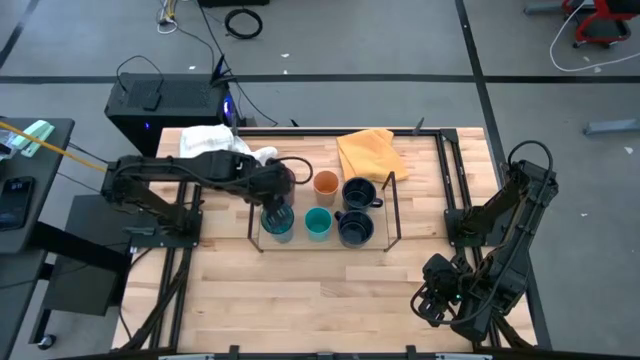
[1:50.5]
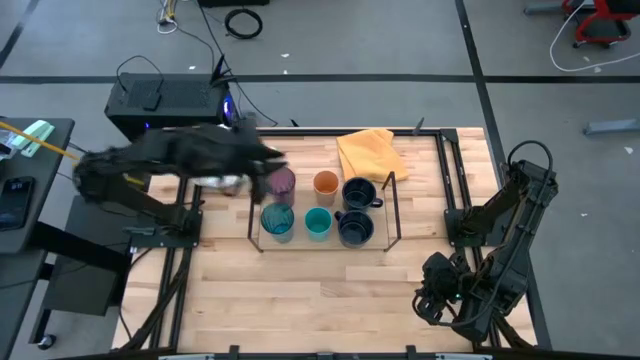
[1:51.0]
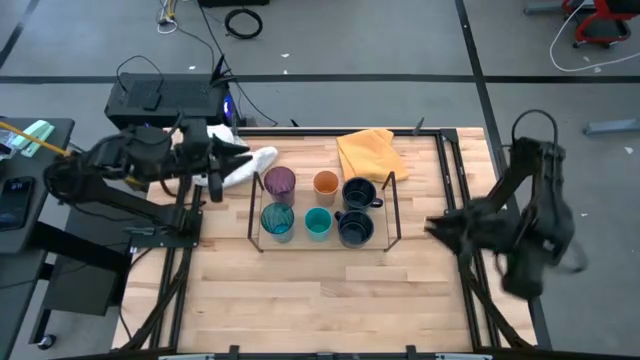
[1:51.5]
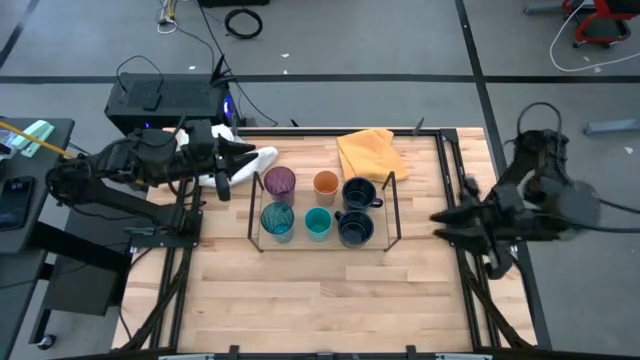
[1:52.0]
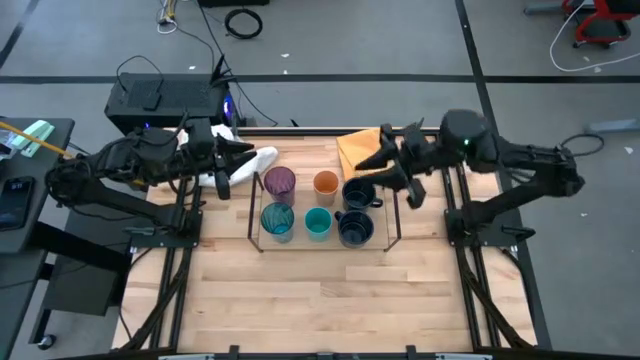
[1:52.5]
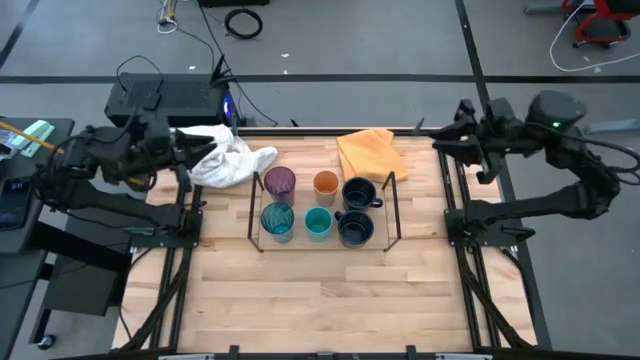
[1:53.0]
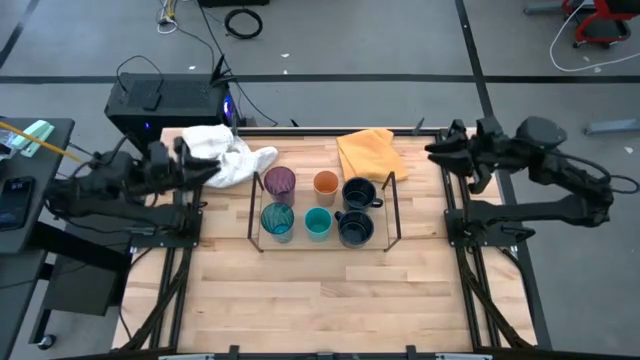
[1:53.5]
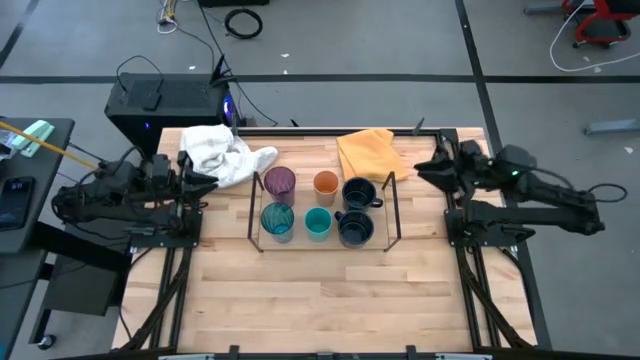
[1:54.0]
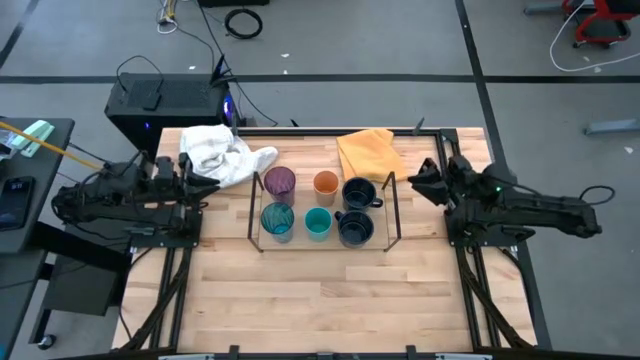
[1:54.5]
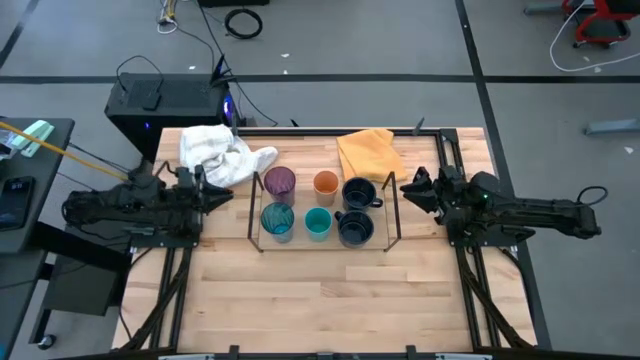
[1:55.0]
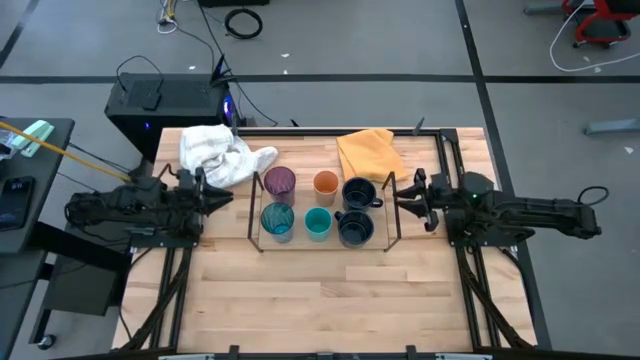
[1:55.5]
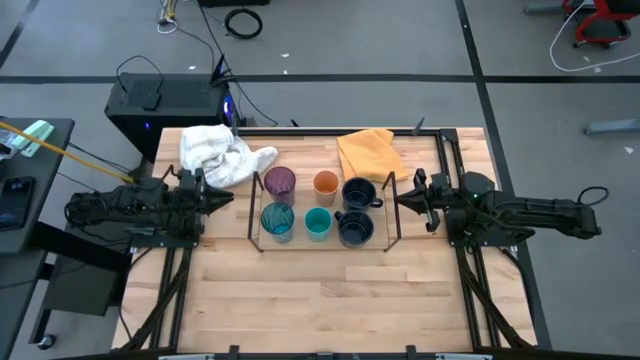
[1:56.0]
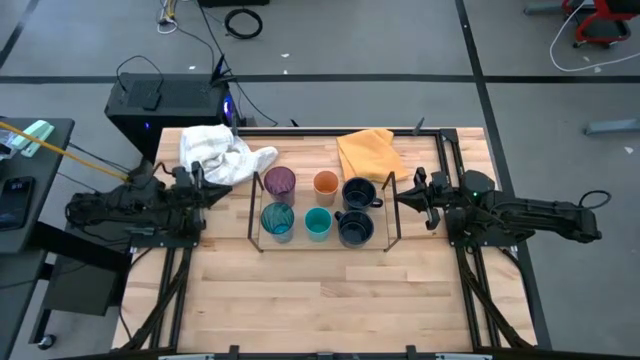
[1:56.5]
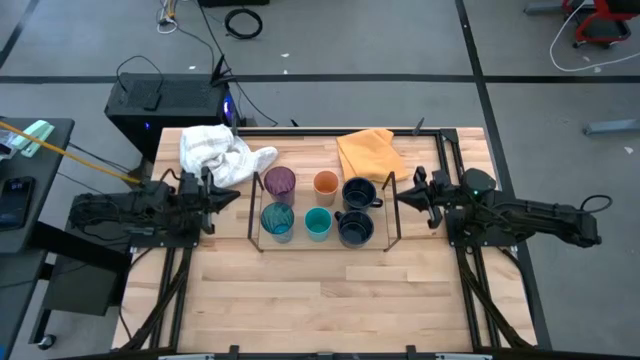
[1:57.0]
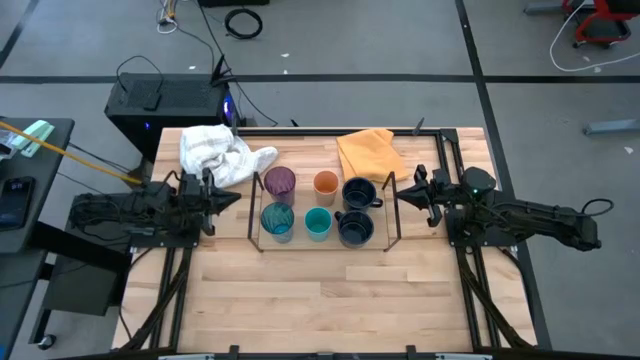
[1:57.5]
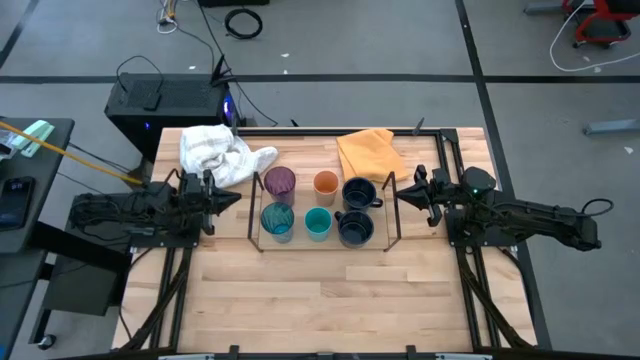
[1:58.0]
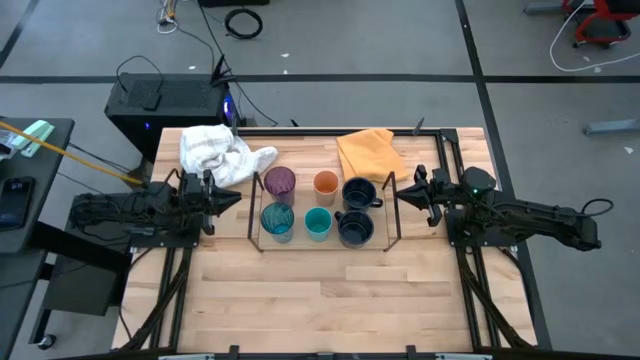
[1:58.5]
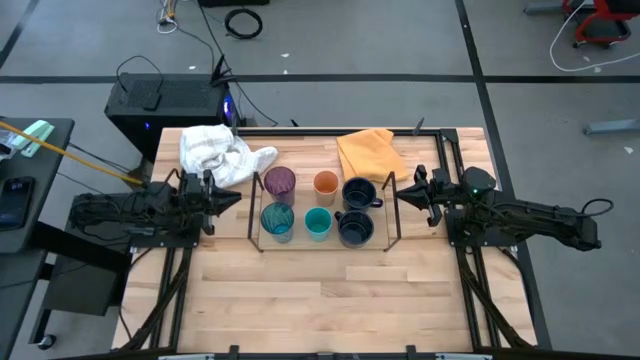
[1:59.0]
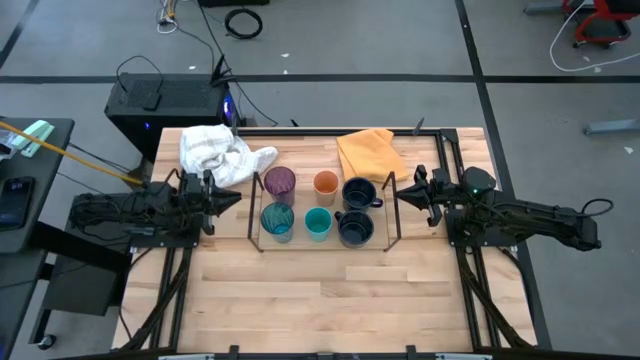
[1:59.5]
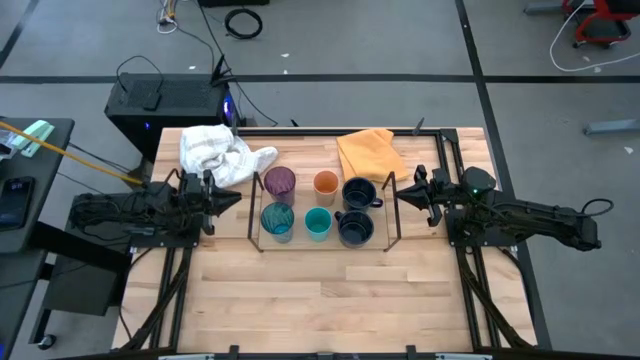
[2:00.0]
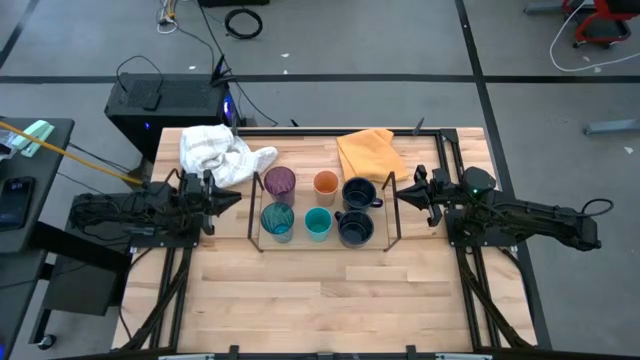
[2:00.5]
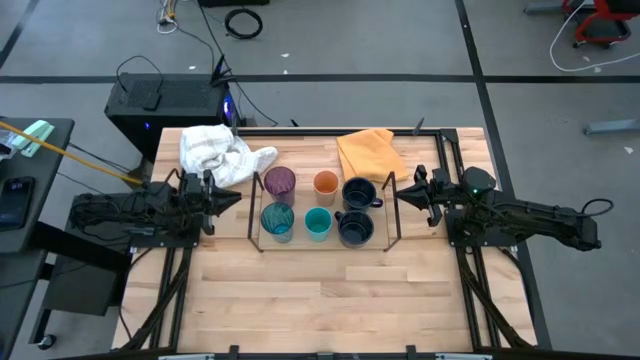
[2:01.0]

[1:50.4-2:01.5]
Task: Stack small to large cups/mugs on shelf
Return to Home Position

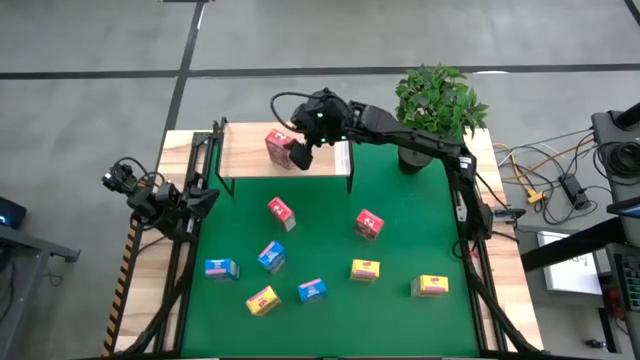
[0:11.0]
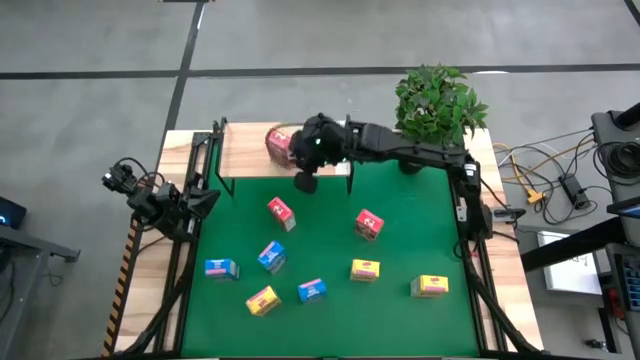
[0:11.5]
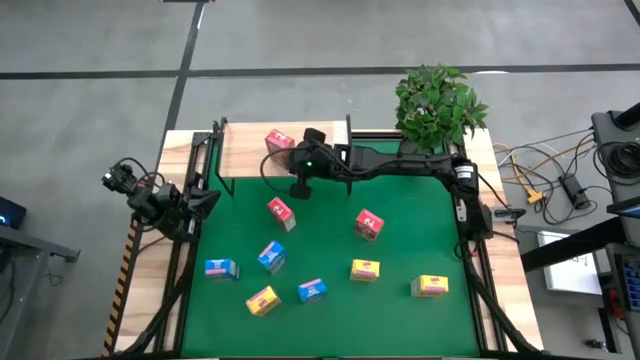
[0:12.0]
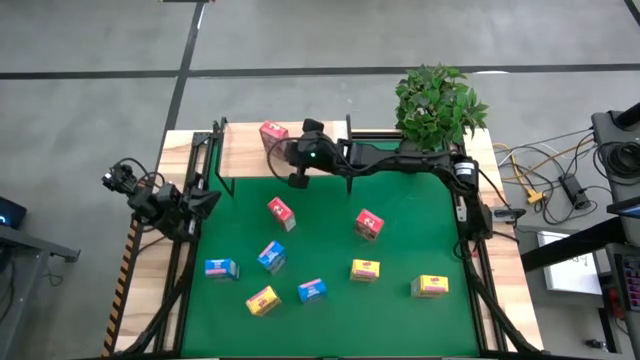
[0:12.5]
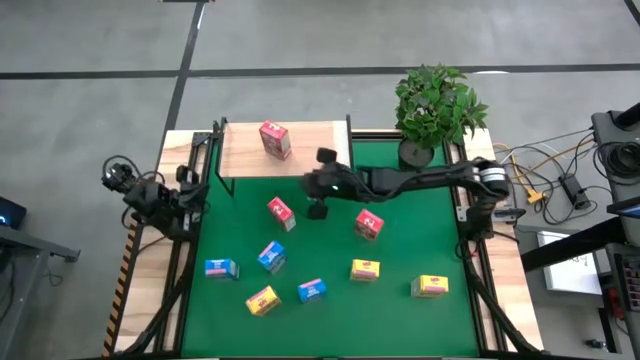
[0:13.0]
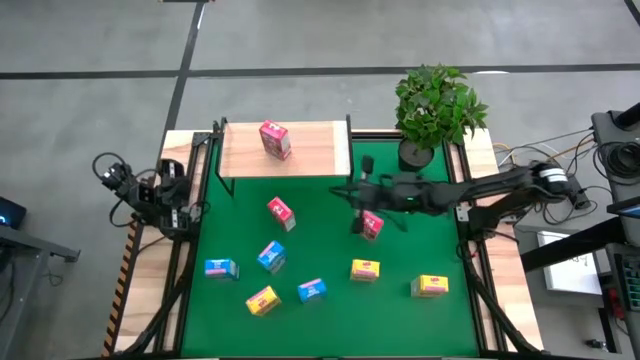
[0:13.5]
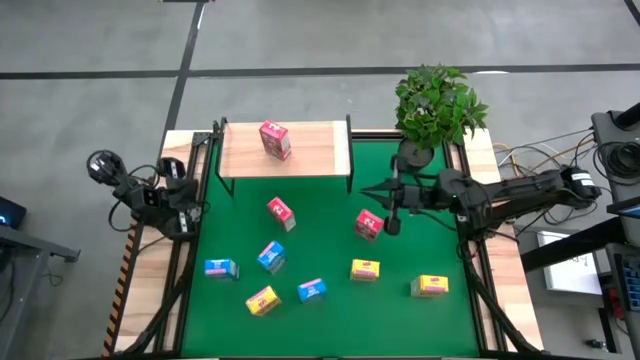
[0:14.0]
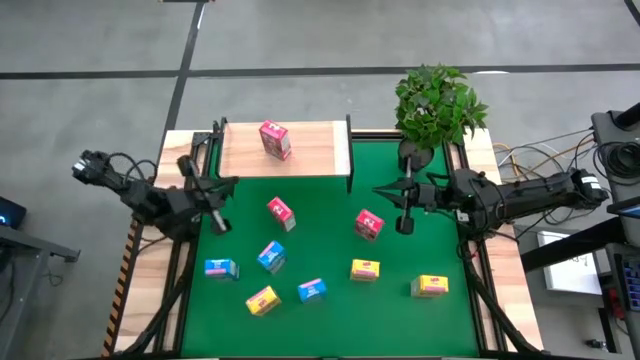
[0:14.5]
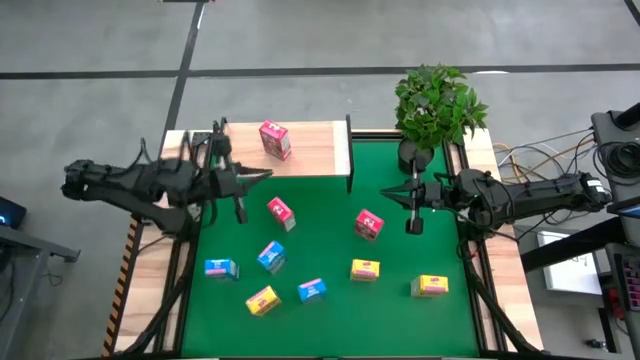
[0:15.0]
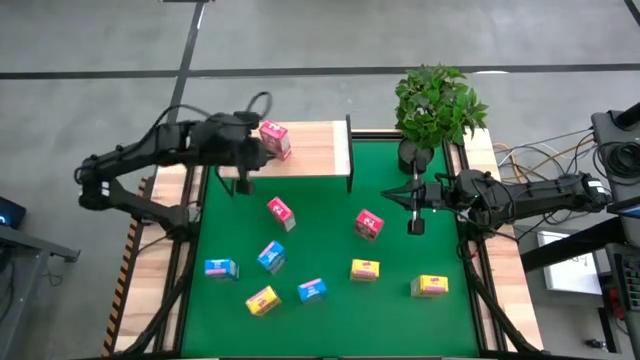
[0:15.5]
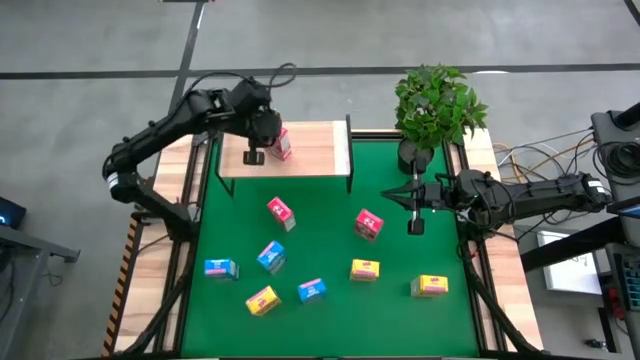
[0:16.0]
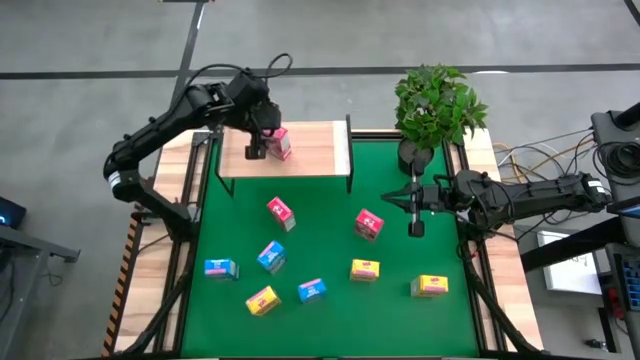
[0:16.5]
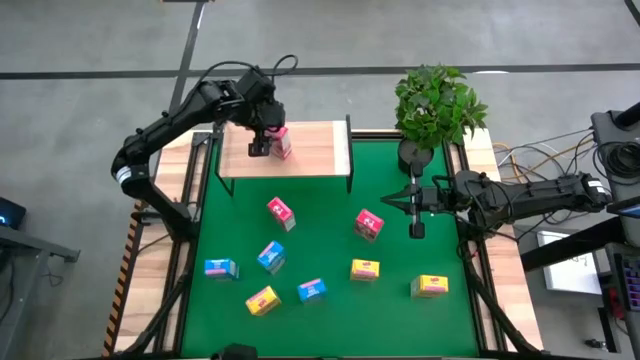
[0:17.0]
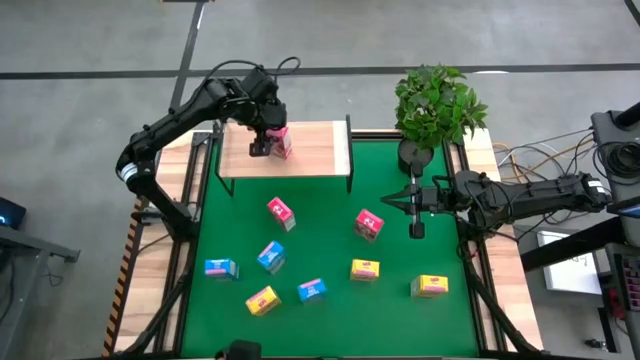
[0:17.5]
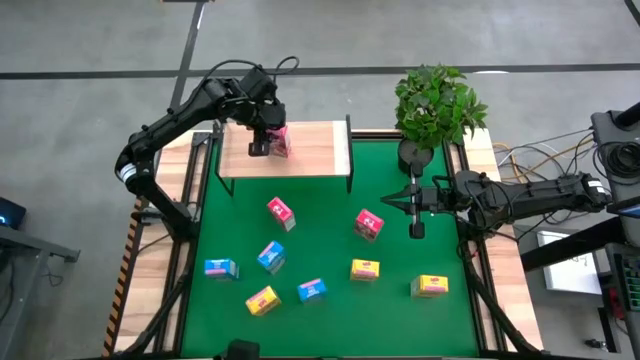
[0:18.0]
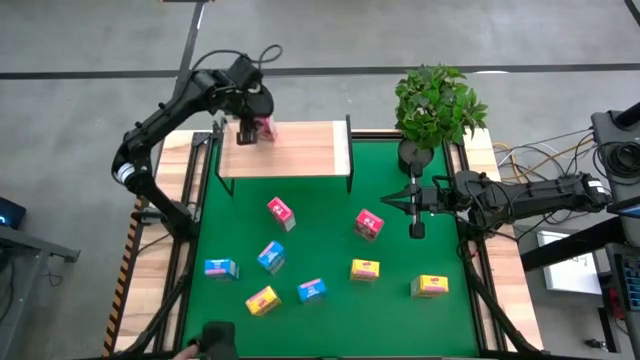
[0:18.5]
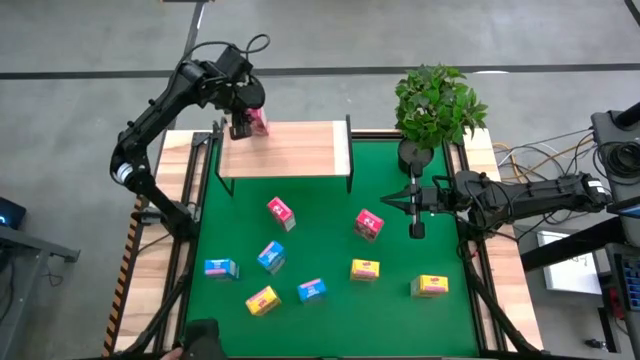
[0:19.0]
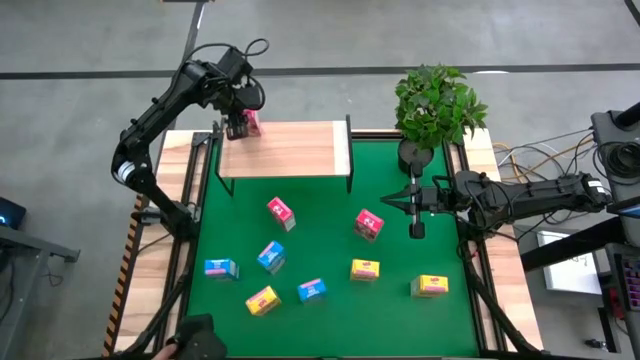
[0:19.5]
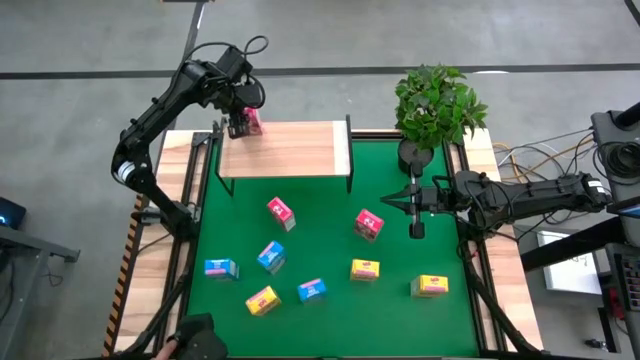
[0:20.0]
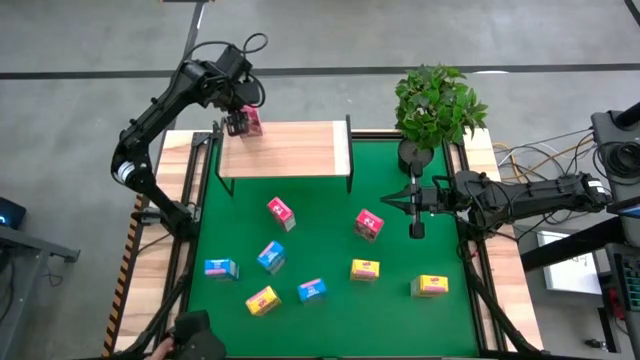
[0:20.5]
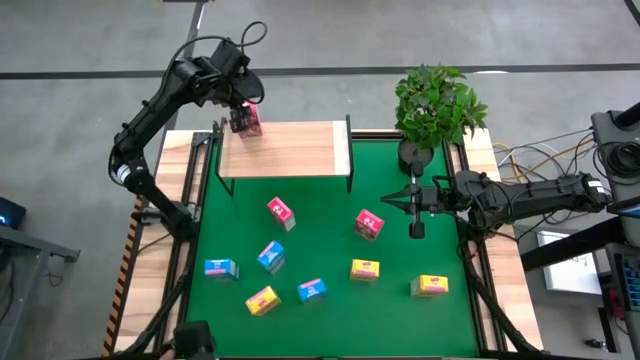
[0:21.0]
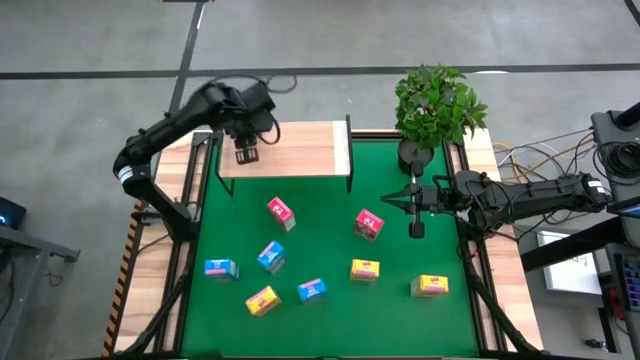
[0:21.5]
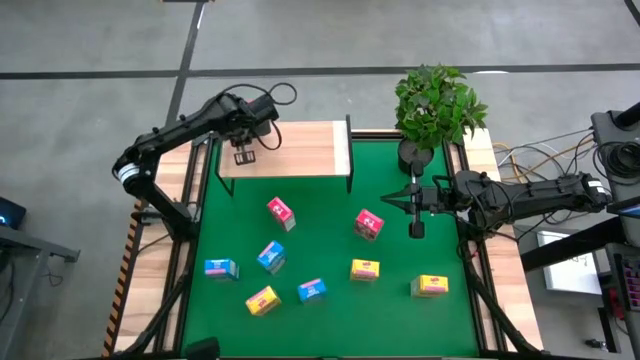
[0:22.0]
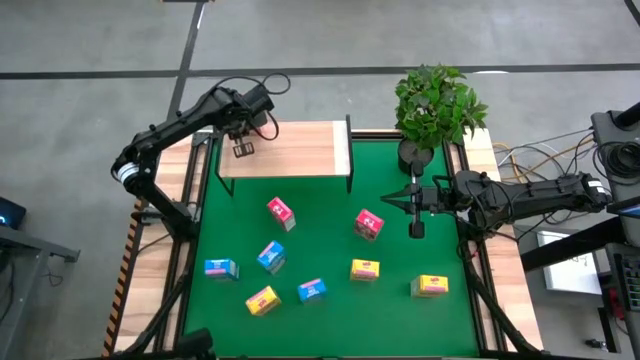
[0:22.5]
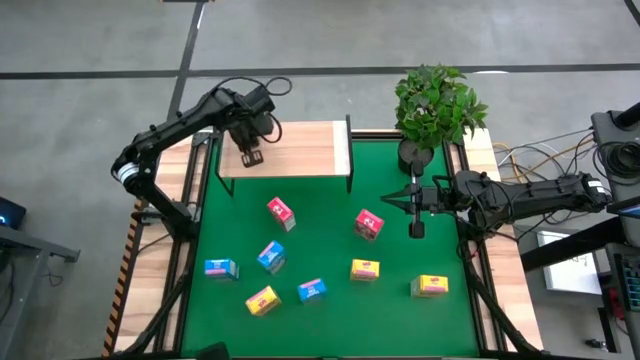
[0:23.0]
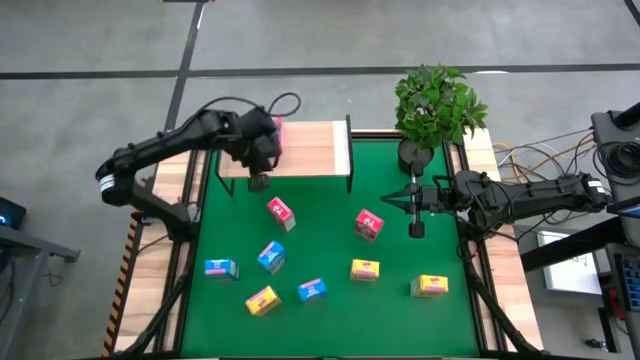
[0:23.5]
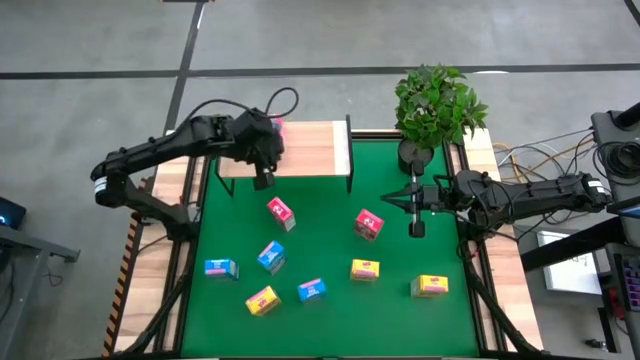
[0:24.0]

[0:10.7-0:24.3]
Task: Stack cereal on shelf
Adjust the red cereal on the shelf
